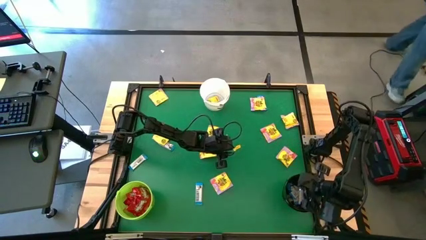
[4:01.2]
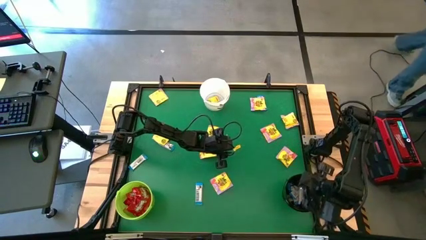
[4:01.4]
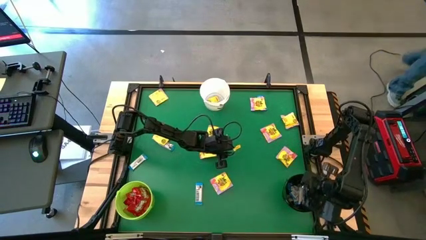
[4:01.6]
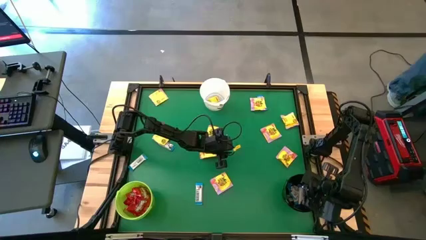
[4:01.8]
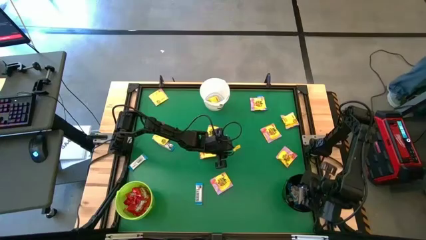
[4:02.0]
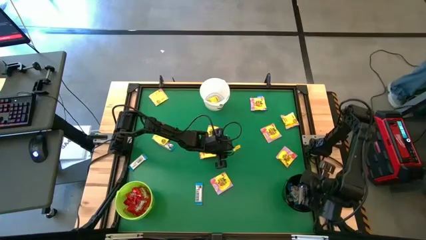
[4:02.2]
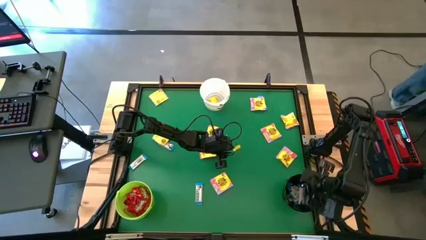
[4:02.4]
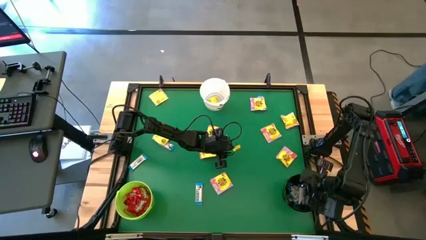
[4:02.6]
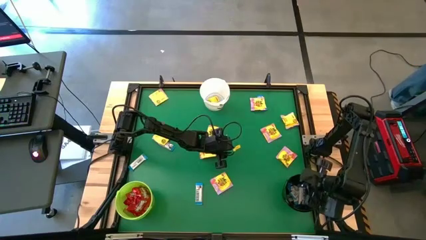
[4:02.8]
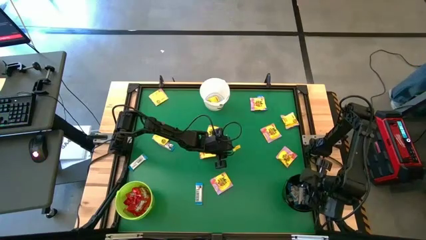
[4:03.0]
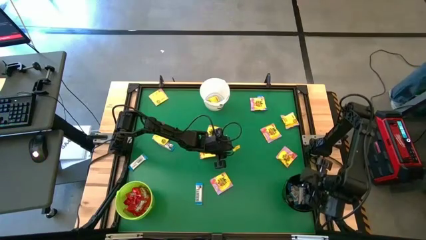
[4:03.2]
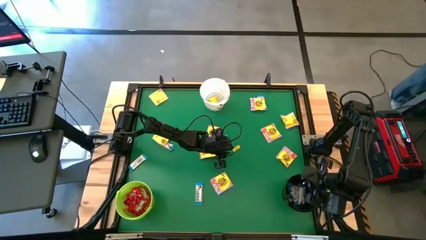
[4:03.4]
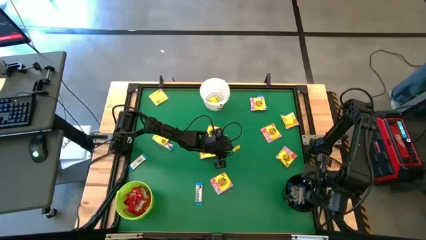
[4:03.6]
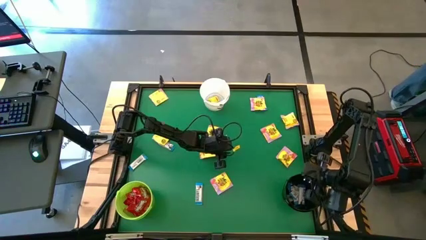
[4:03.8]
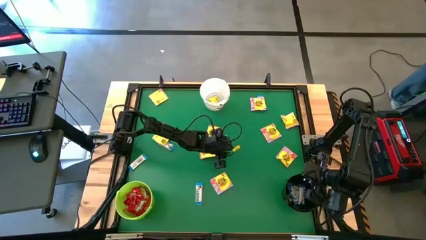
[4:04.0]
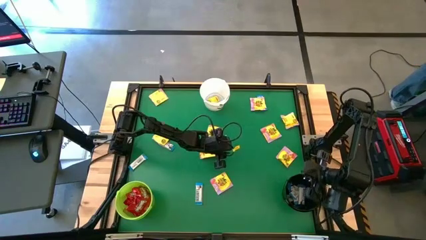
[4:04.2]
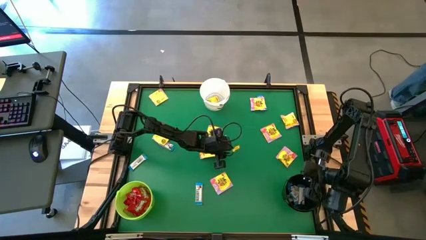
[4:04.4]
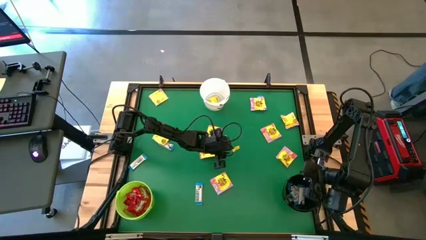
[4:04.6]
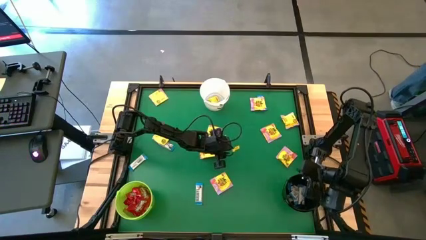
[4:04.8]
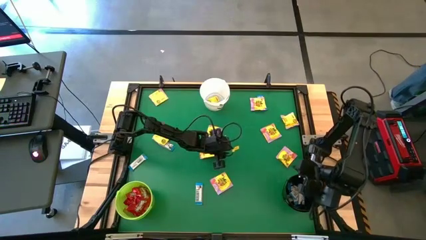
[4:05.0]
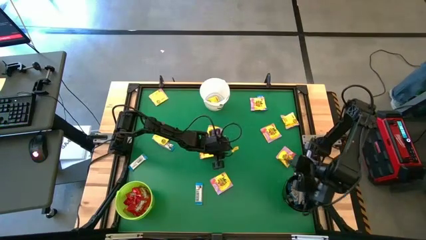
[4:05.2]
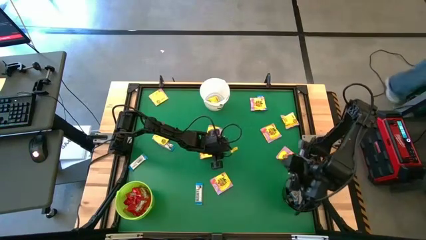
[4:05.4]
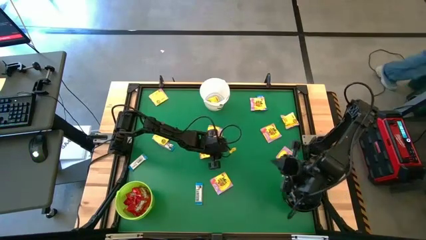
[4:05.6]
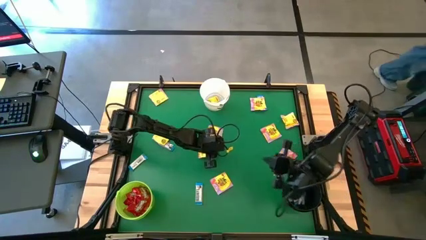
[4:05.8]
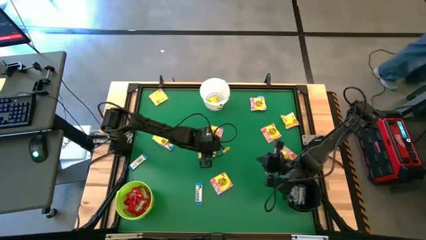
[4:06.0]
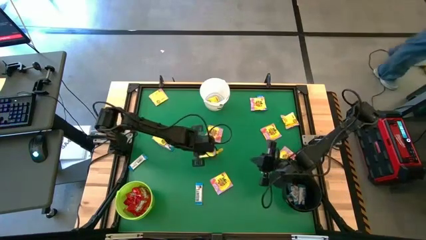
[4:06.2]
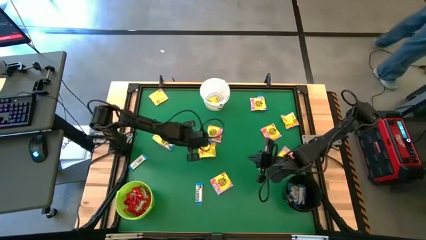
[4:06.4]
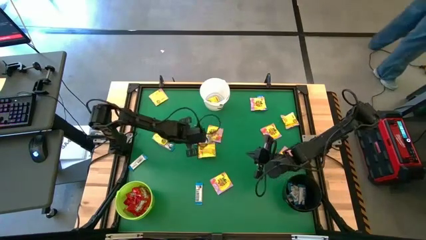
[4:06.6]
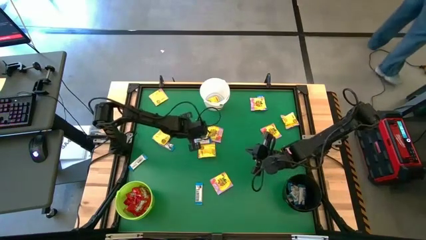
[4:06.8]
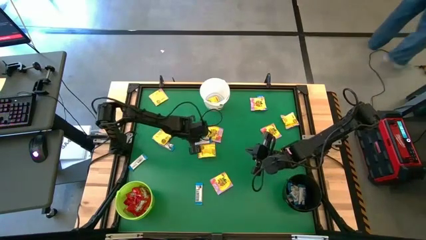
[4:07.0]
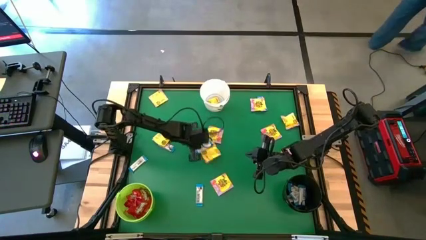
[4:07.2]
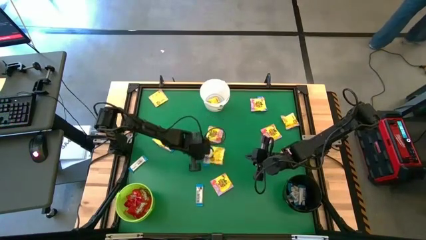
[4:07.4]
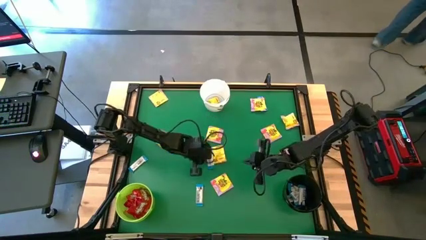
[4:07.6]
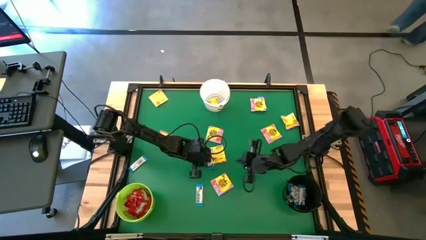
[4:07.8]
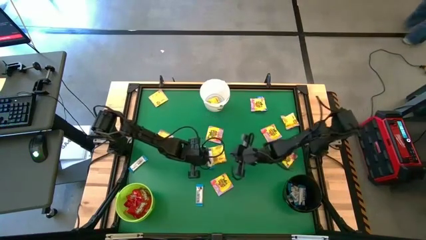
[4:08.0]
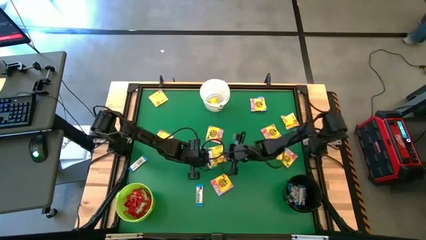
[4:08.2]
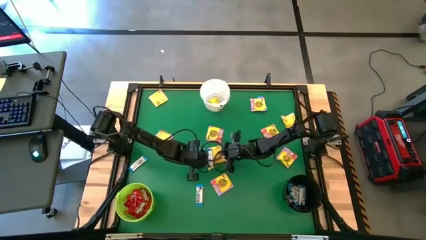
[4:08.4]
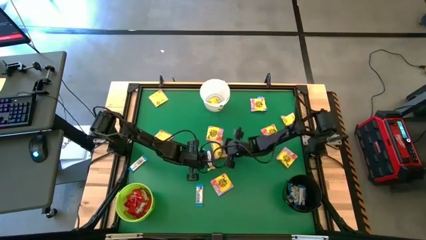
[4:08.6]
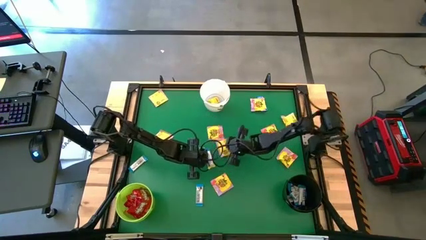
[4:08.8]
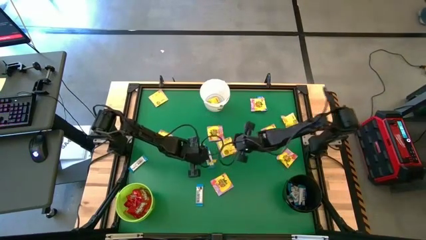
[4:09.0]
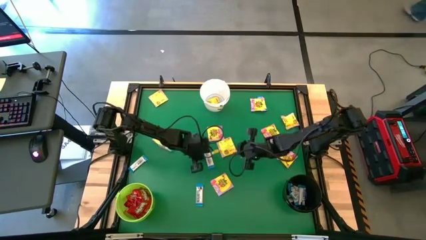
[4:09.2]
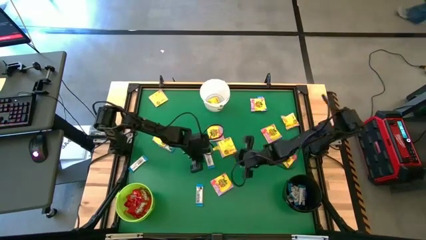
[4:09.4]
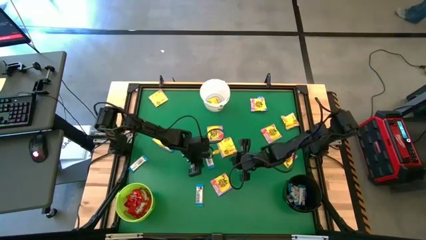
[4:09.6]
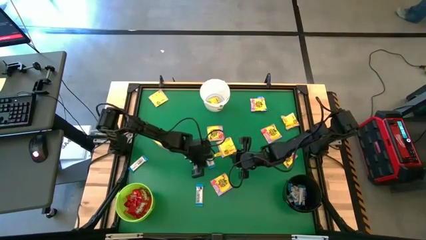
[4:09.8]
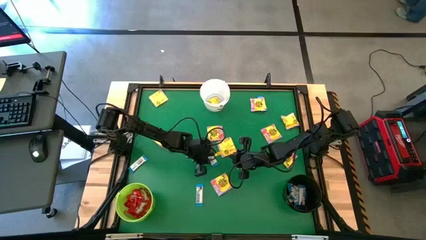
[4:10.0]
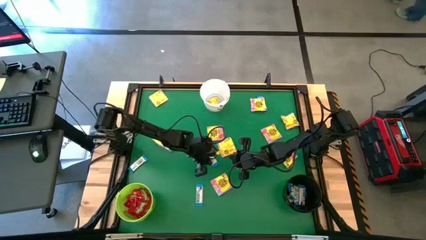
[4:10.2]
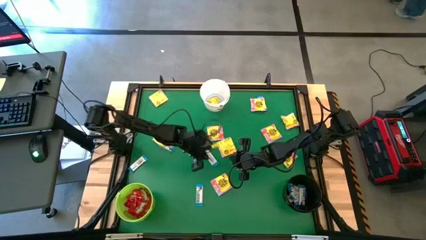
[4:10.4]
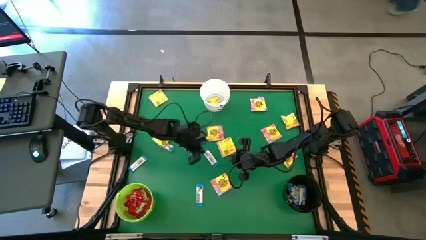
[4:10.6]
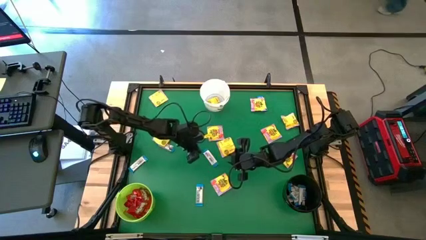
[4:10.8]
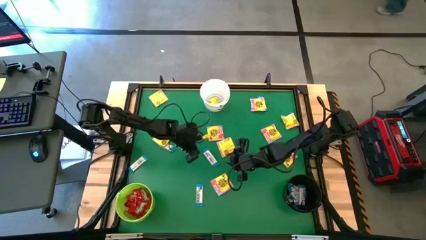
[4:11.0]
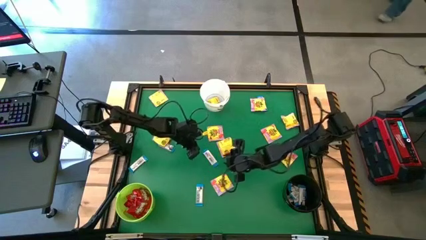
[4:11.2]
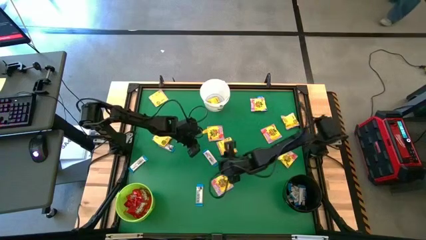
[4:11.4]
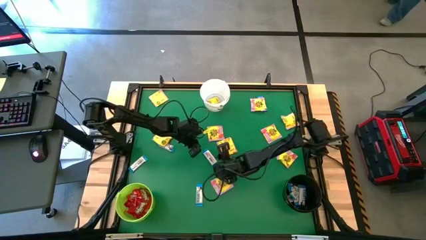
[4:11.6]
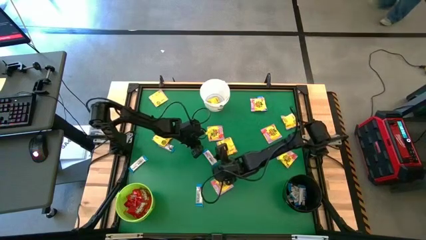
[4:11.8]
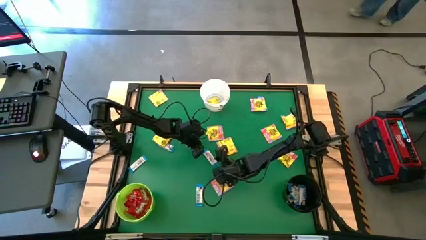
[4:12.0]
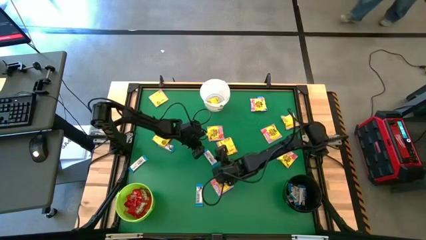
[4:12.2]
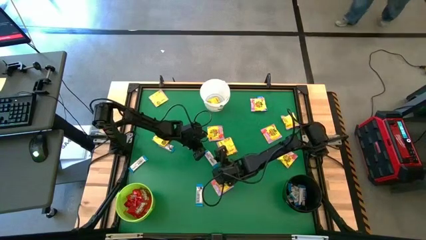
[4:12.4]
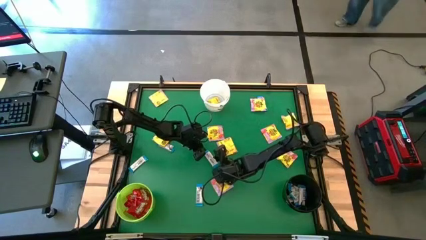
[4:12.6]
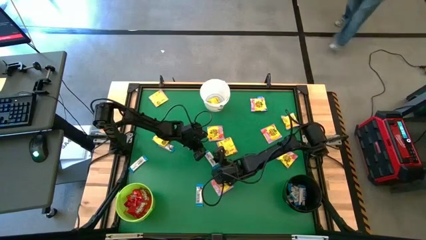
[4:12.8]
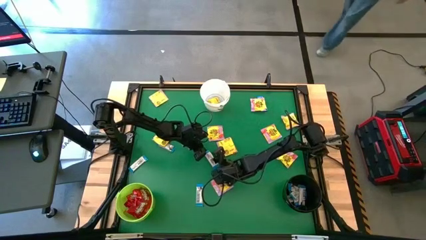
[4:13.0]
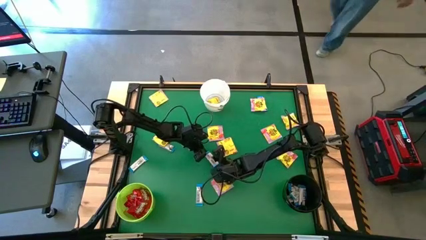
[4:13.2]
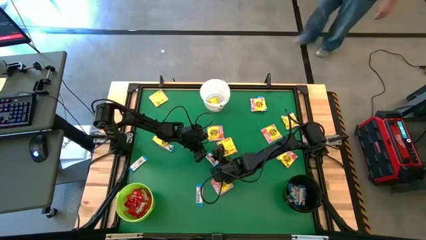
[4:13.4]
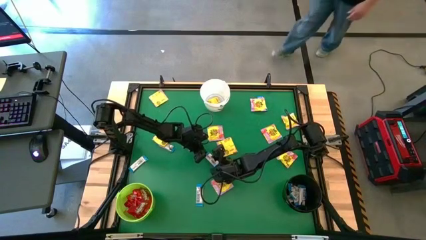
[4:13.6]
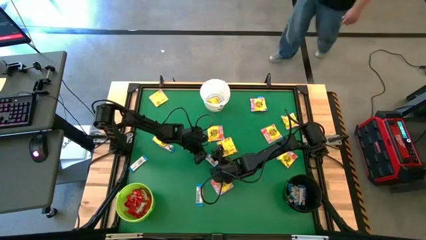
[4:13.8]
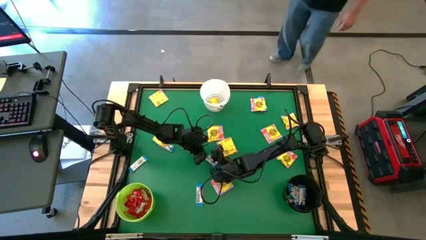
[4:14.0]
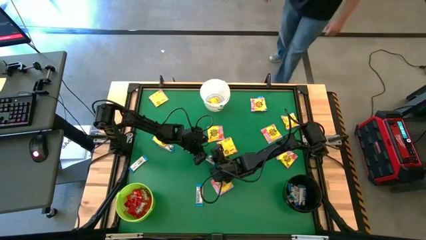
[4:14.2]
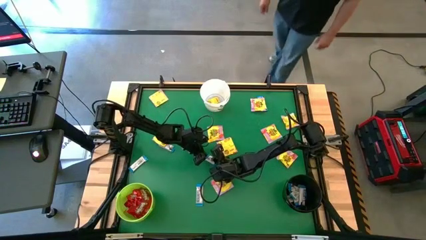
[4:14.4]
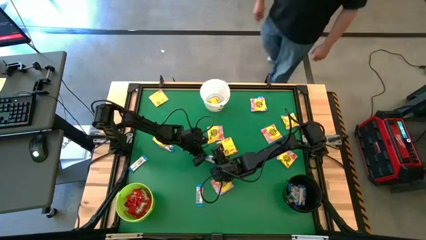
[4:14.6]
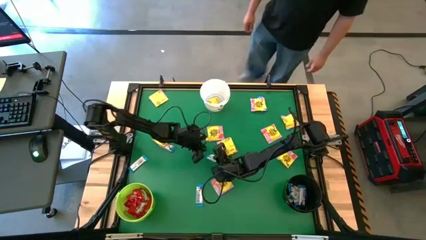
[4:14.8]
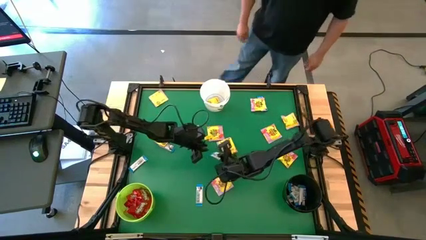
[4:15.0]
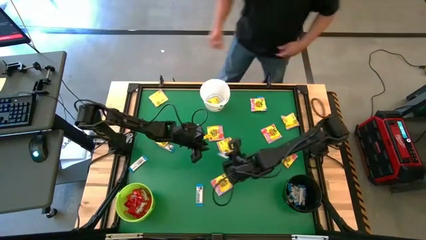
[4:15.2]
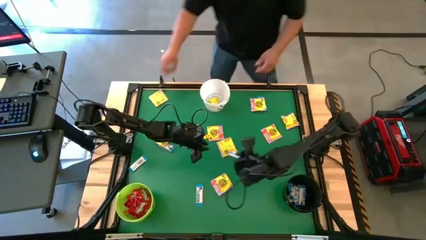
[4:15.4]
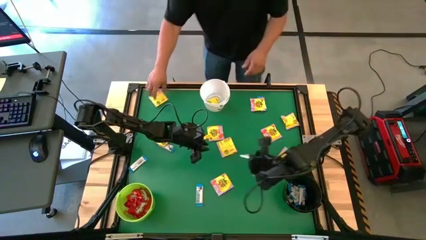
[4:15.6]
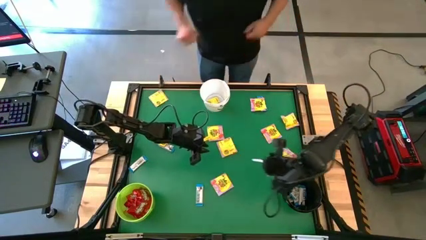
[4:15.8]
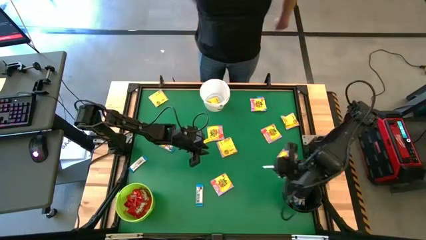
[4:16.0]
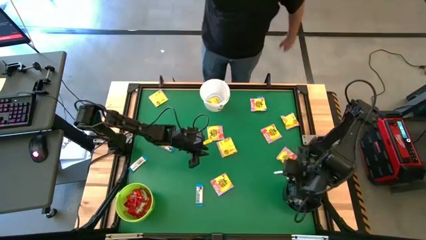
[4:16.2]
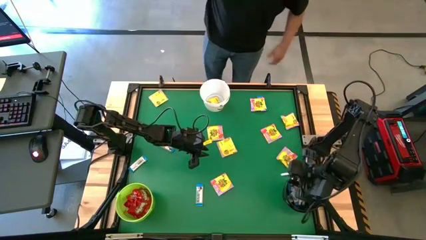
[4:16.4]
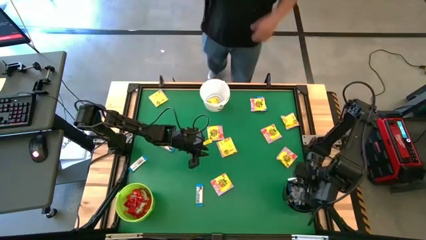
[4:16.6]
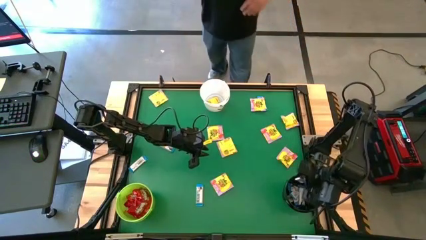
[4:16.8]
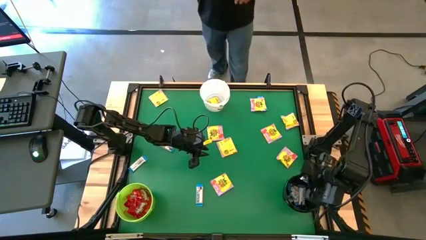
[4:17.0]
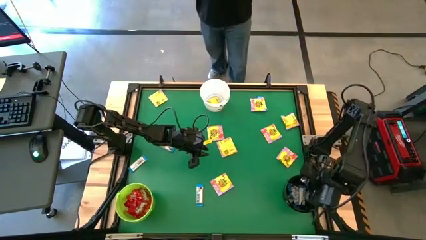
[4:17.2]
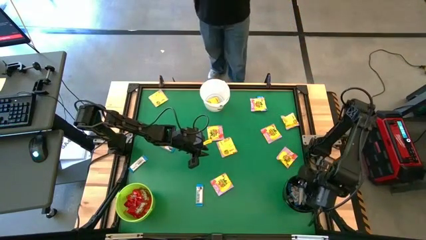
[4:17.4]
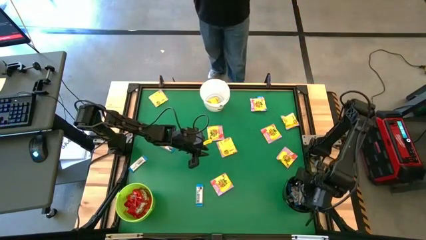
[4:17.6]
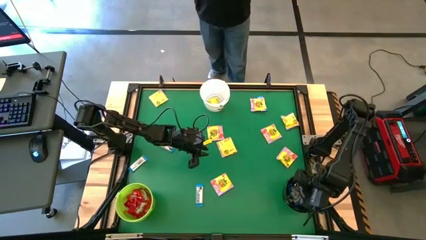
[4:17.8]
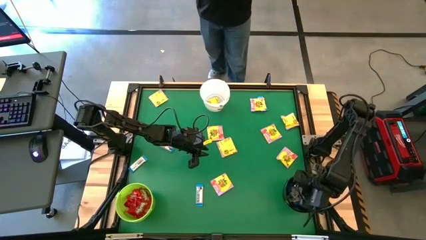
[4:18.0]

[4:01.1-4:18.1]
Task: Sort candy by brand, put in halloween buckets
Put the white candy into the black bucket

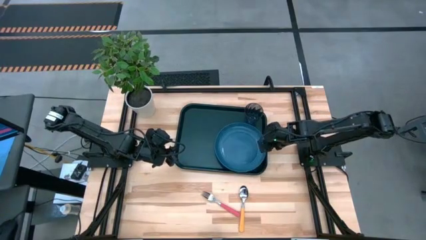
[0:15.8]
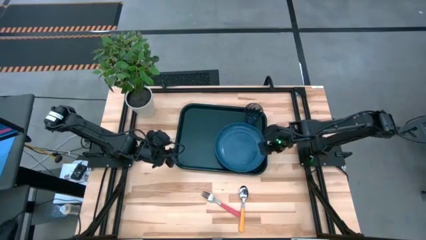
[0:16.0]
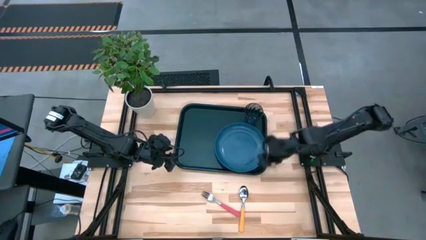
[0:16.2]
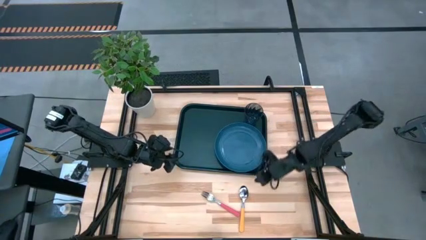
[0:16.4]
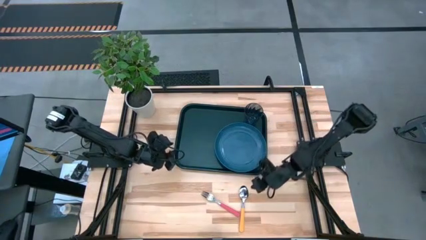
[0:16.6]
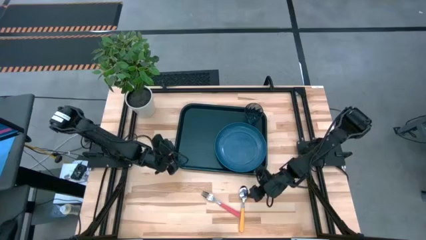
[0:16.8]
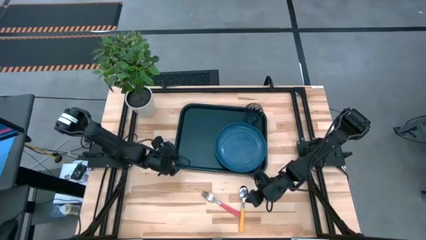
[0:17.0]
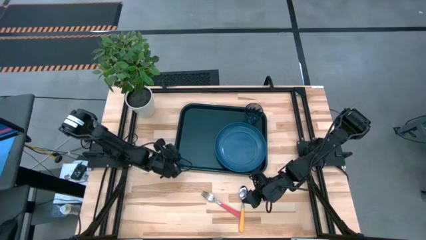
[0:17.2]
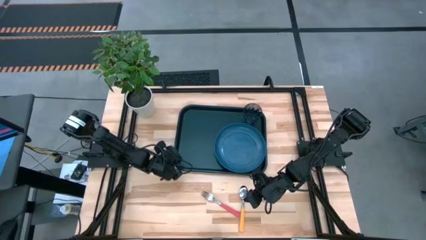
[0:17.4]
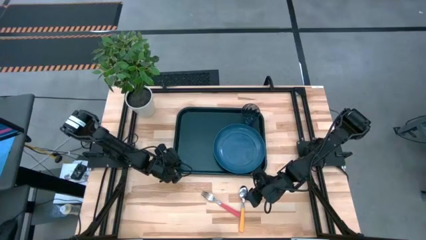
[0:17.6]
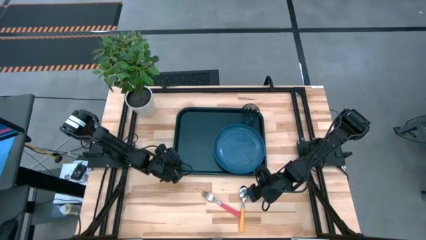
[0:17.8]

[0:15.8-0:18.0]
Task: Pick and place plate/cup/fork/spoon on tray
Adjust the black tray
